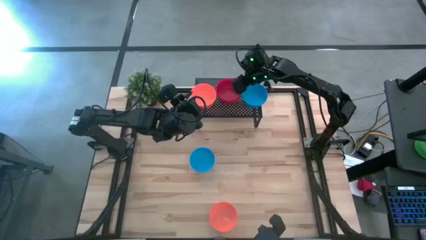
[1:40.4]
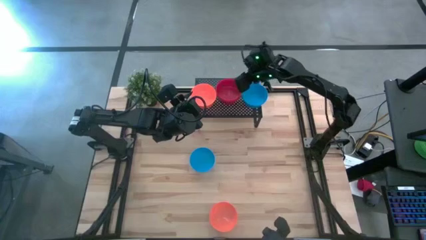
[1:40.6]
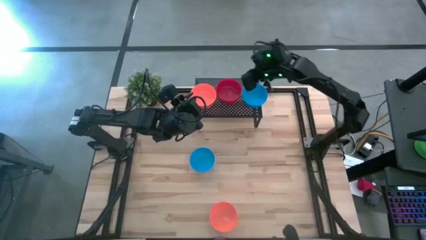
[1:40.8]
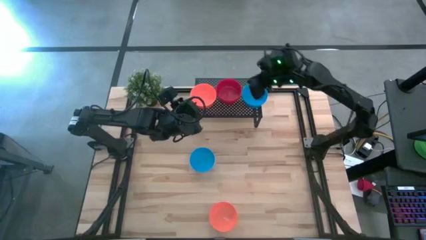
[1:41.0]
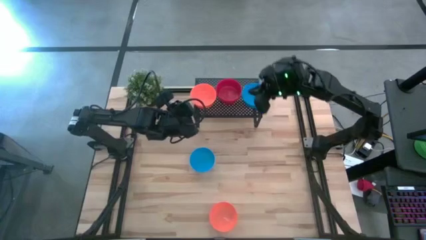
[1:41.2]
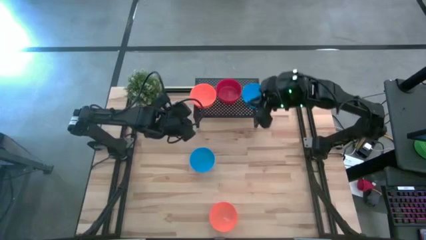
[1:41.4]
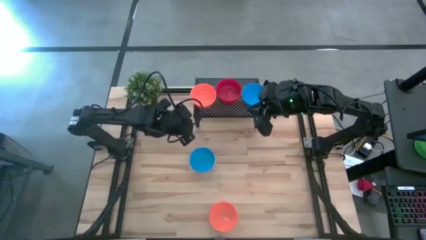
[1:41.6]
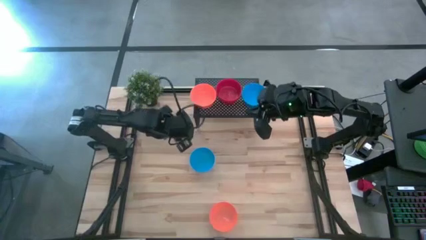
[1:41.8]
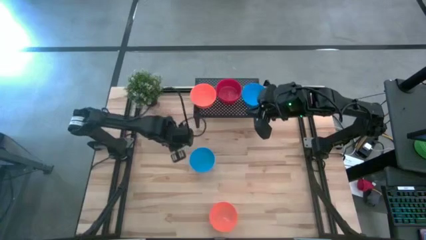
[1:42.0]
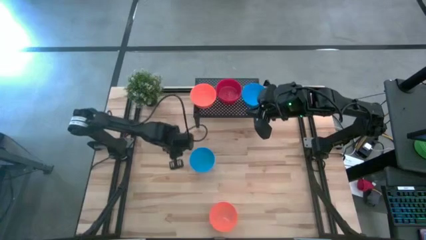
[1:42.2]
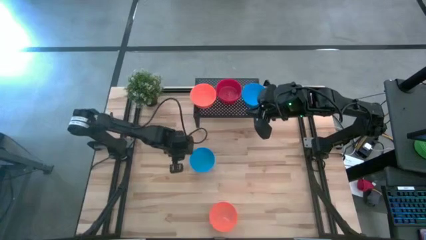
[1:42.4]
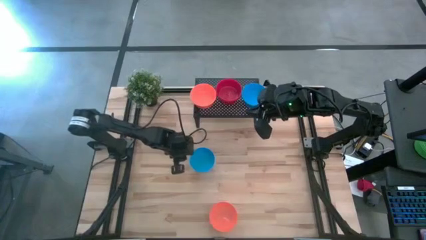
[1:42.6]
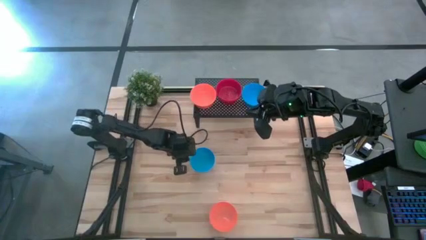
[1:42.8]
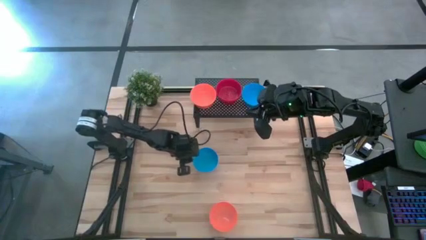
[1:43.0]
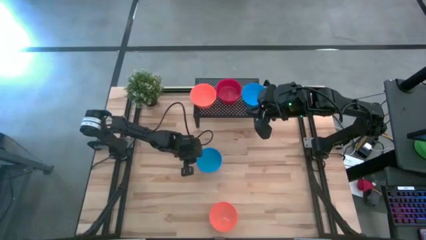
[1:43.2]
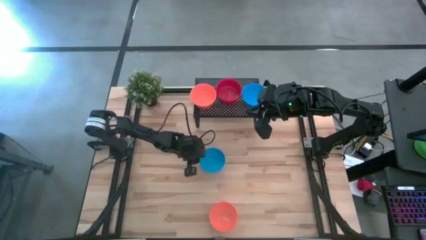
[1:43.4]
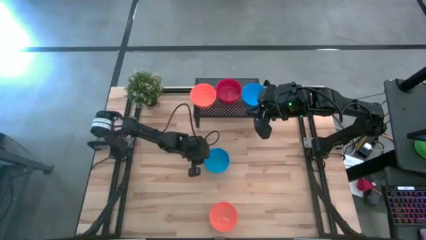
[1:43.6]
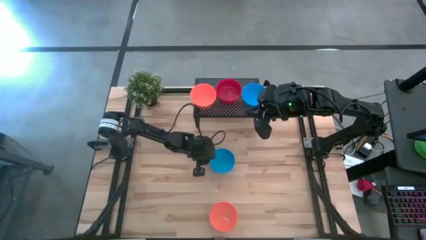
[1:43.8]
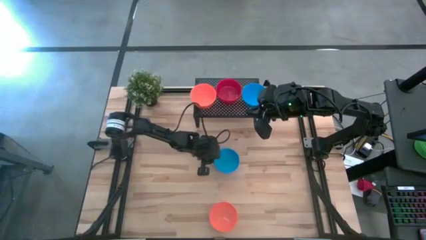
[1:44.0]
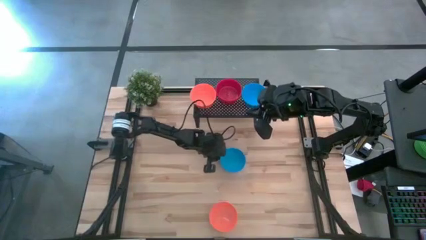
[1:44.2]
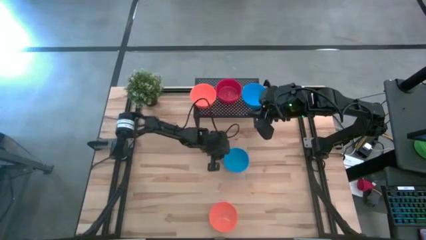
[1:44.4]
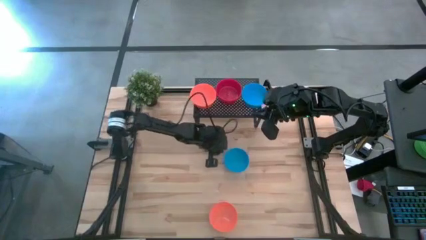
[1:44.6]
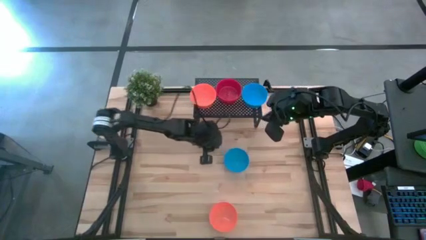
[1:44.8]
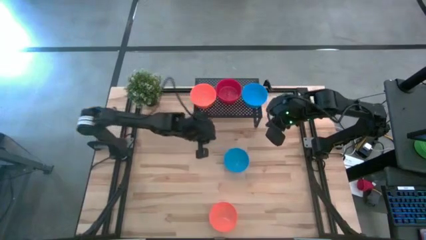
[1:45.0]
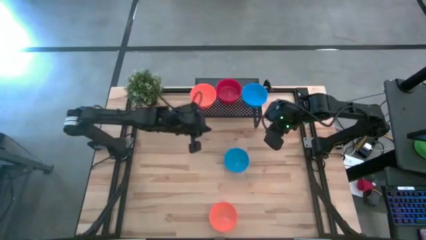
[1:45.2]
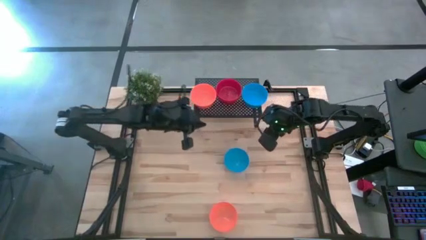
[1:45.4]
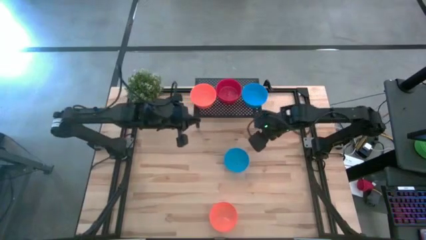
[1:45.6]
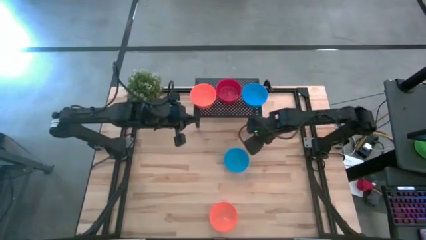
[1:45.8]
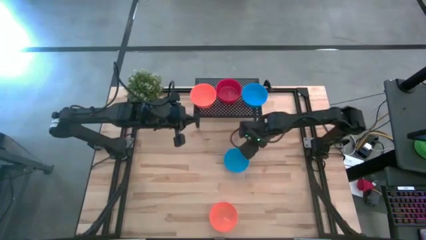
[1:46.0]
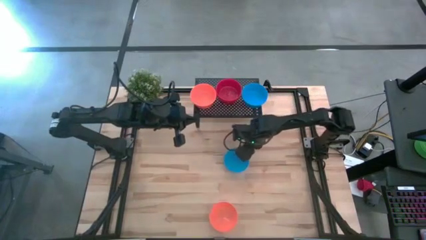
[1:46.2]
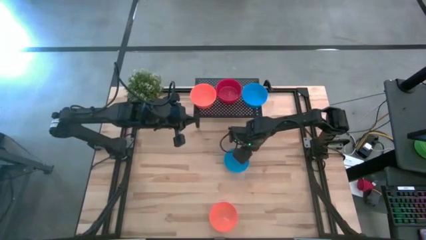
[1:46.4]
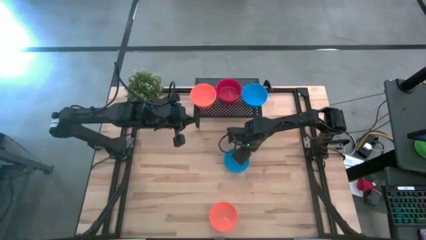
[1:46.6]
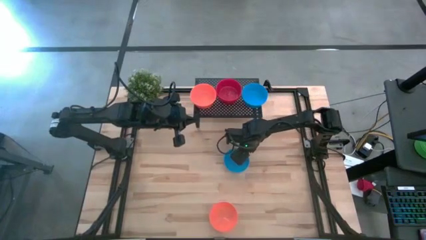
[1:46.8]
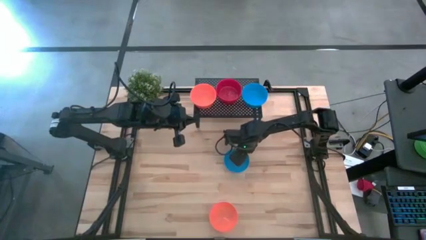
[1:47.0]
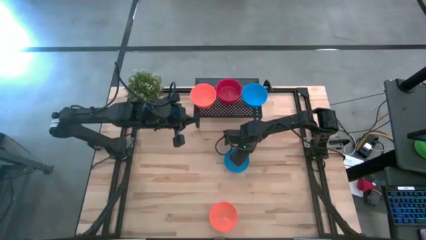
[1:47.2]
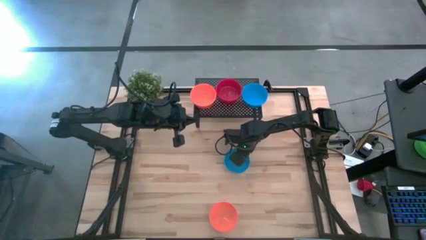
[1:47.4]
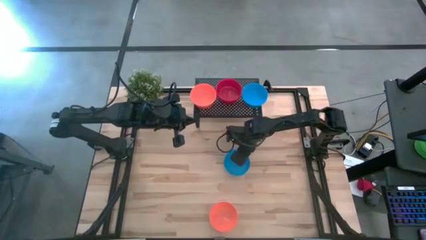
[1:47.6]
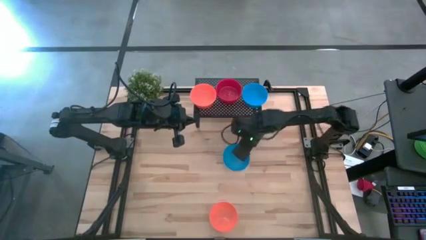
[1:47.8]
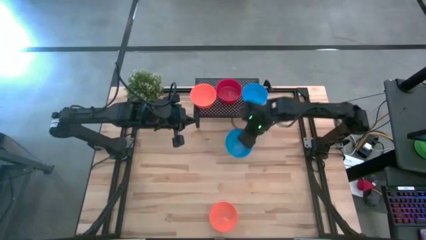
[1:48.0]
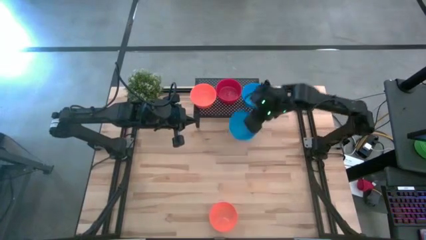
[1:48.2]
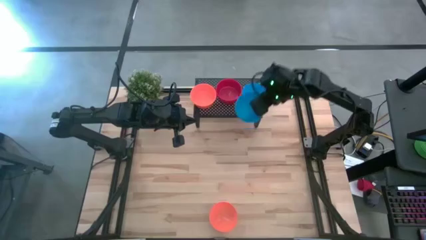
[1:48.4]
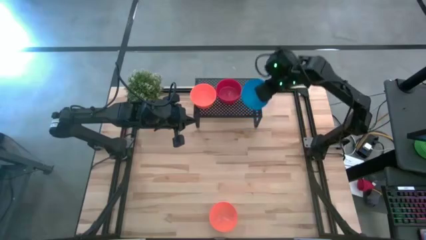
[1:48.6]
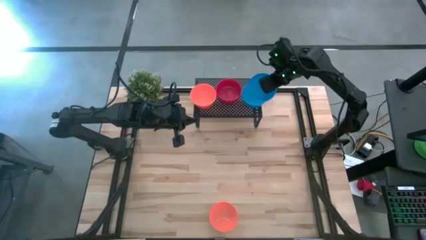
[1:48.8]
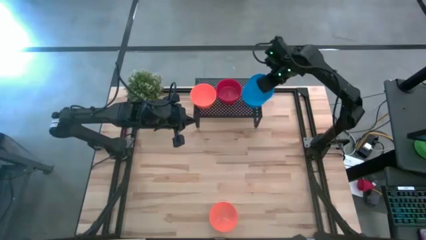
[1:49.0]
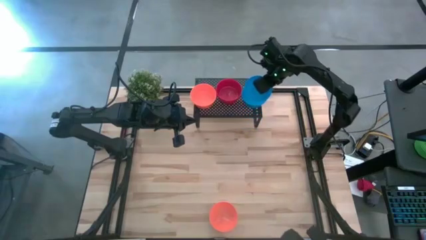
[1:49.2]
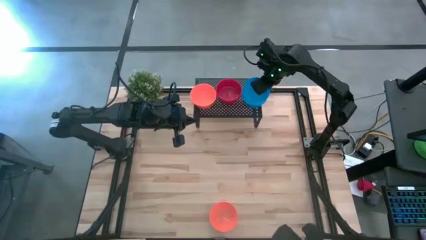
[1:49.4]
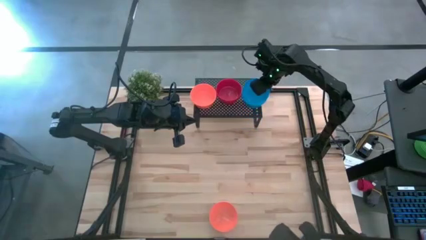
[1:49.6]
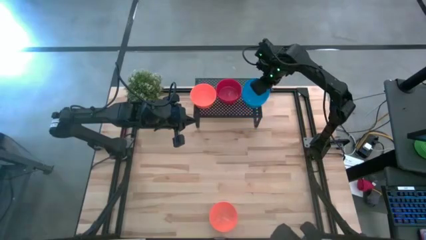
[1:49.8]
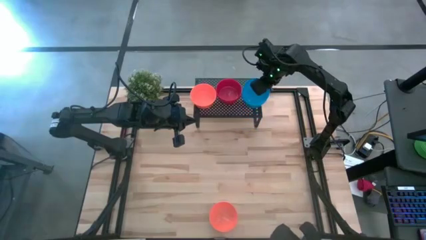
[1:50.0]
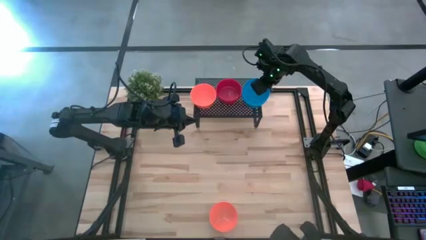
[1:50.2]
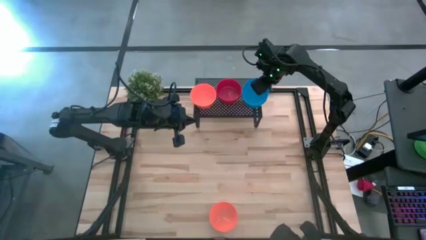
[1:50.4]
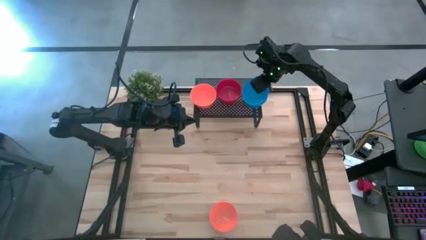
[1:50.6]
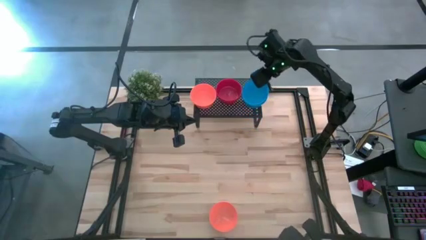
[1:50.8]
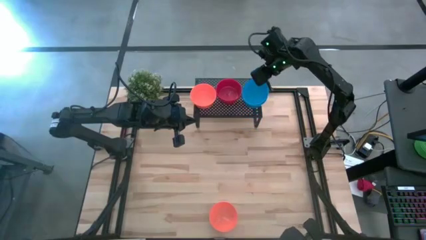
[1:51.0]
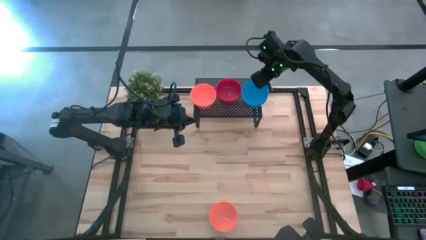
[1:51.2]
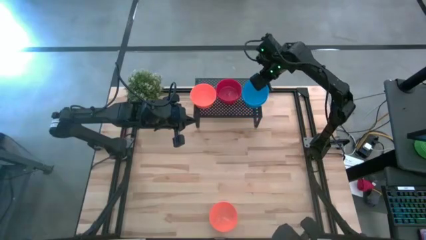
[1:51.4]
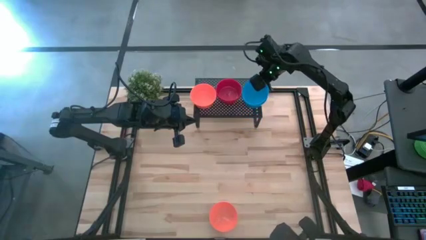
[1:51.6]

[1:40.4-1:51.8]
Task: Pick & Place Mini bowls
Stack the blue bowl on top of the blue bowl on the shelf
